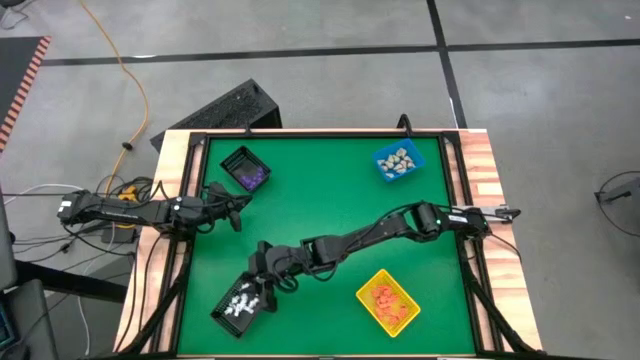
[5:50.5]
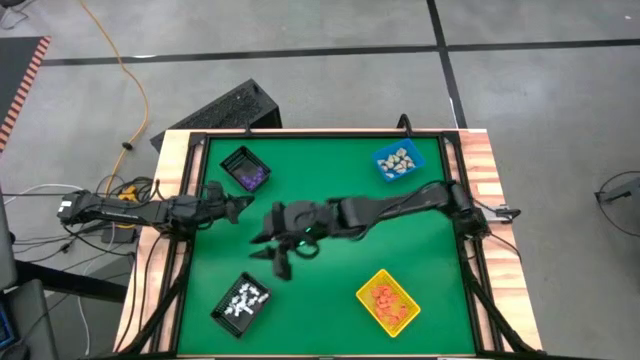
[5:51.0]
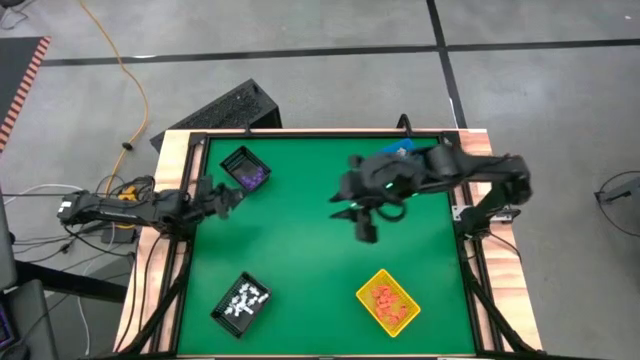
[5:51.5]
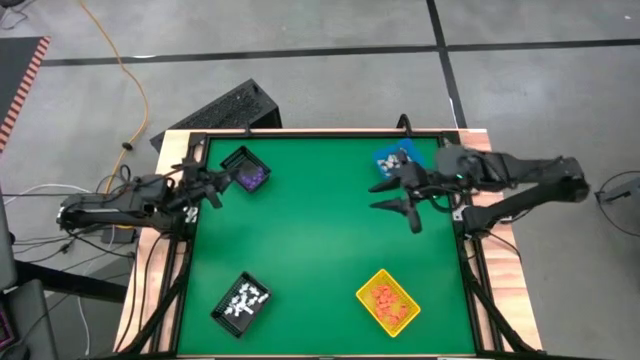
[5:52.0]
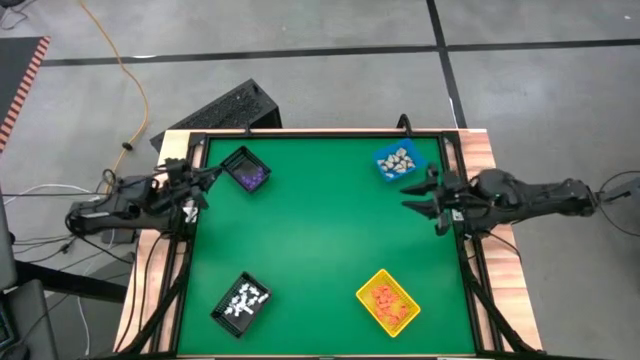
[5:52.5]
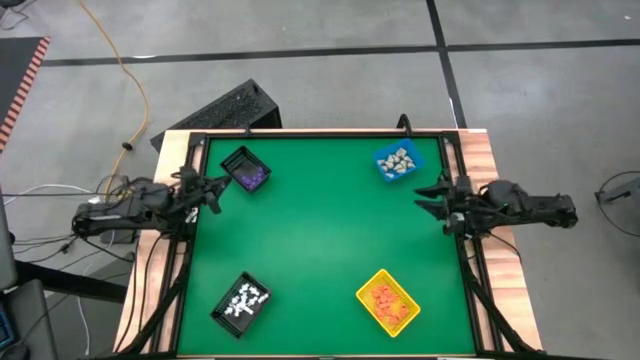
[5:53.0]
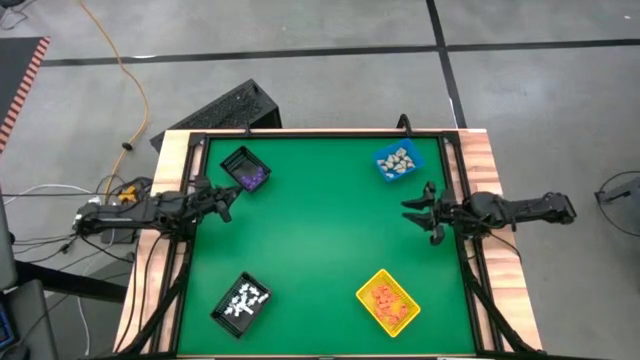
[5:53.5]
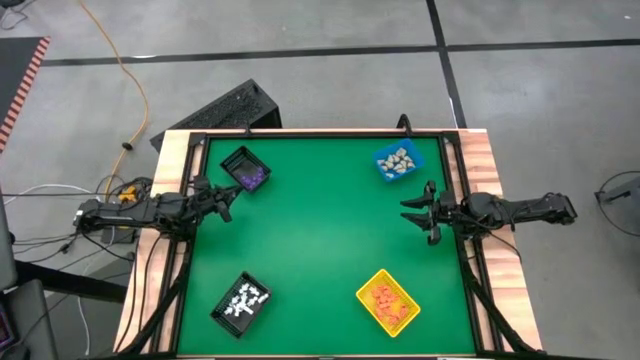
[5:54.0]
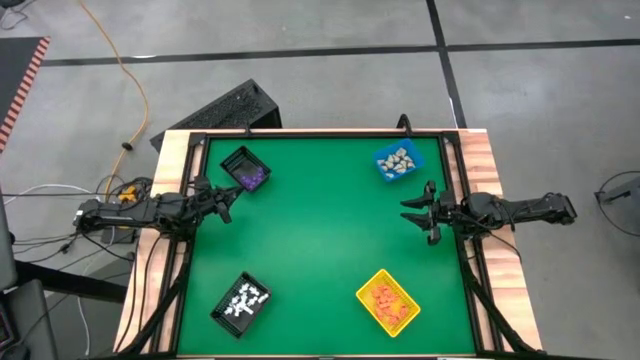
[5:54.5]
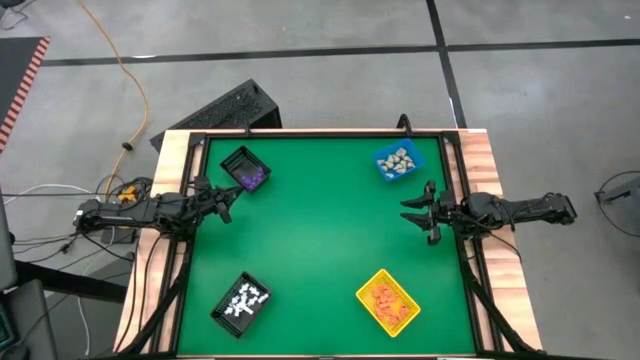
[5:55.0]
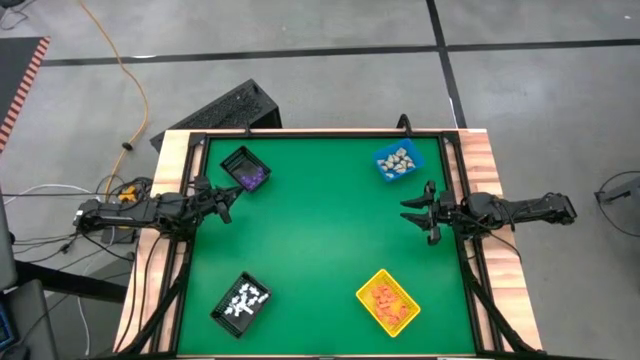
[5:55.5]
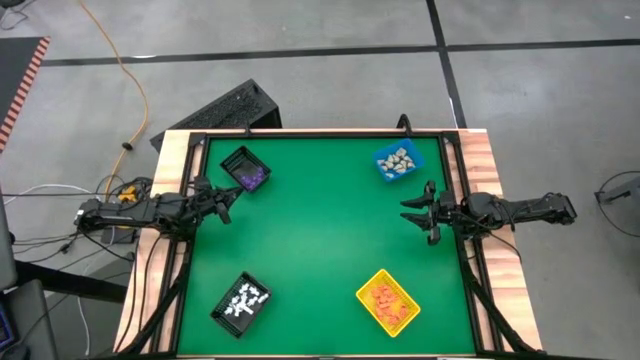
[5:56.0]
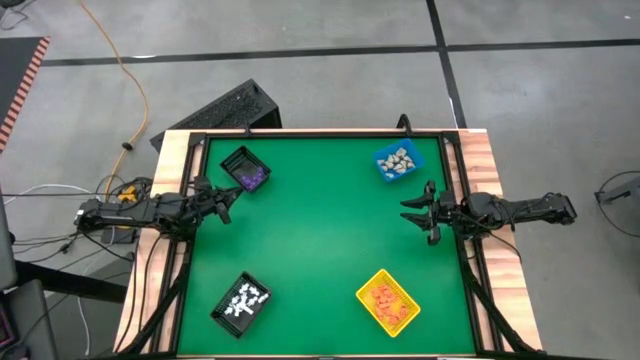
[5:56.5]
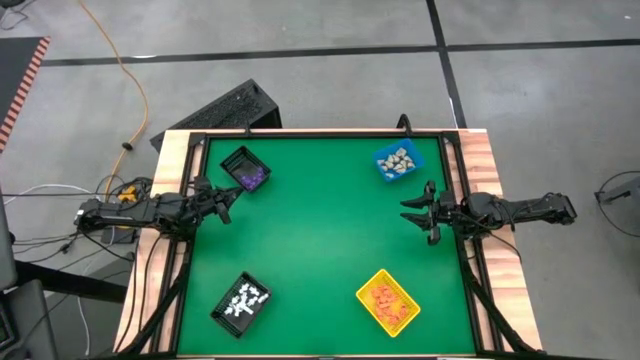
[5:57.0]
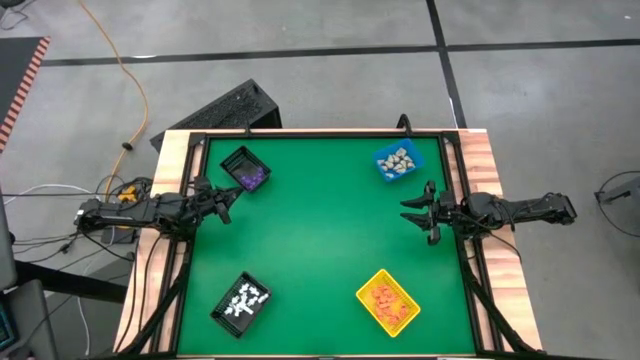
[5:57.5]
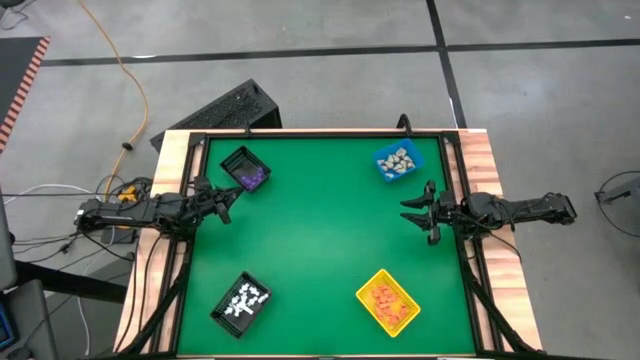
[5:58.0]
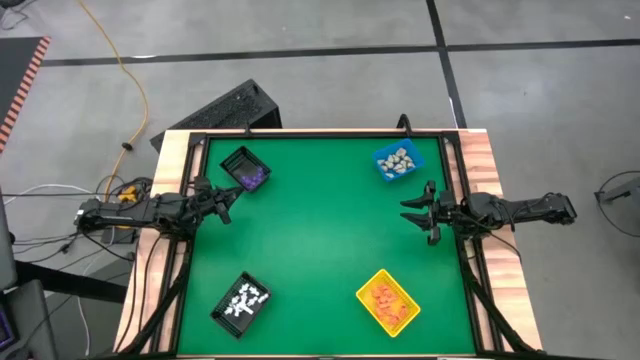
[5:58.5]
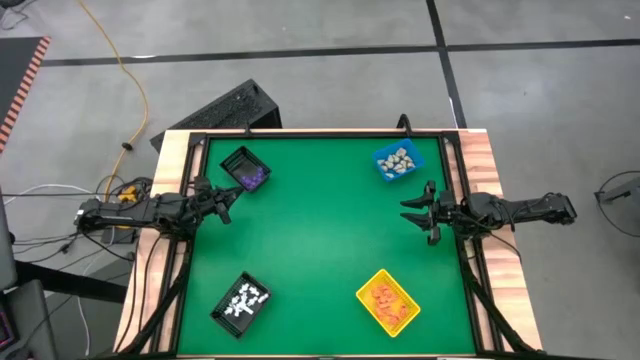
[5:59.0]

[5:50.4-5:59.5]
Task: Sort Halloween decoration
Return to Home Position

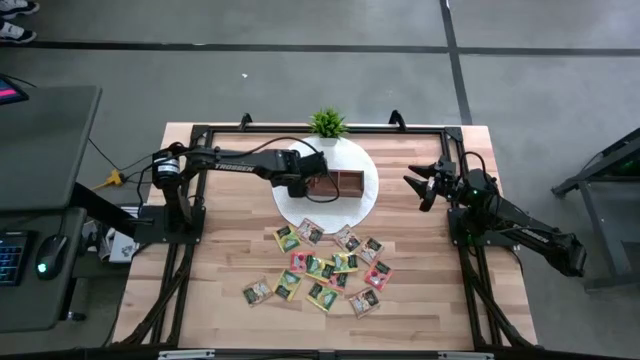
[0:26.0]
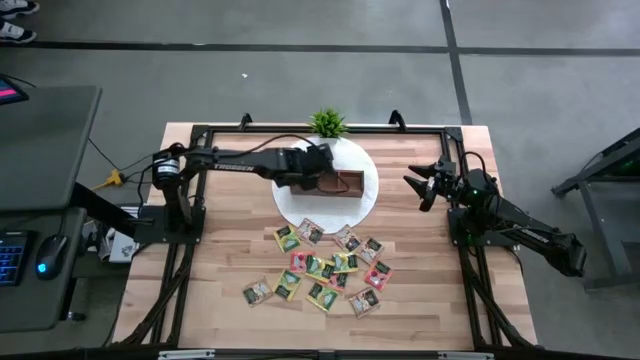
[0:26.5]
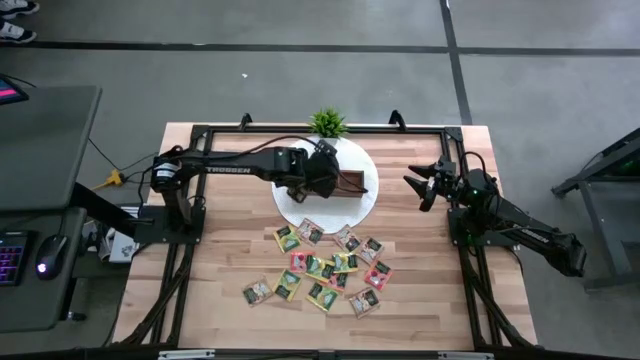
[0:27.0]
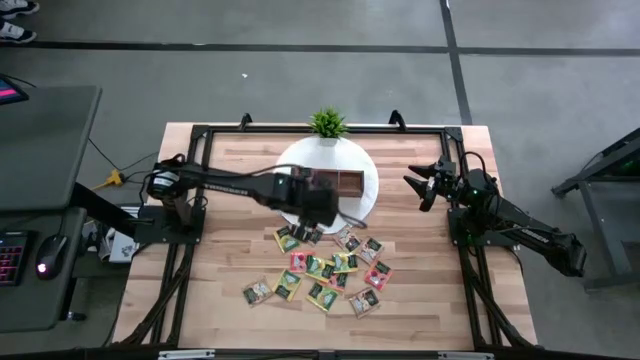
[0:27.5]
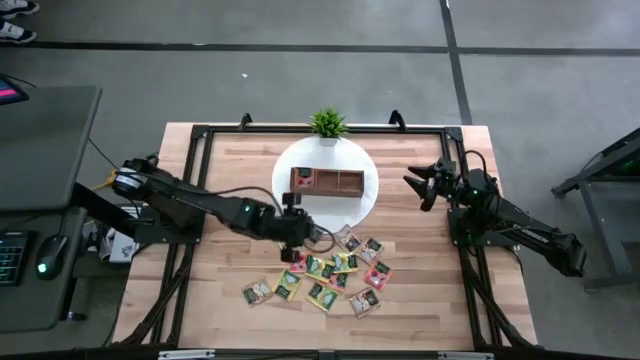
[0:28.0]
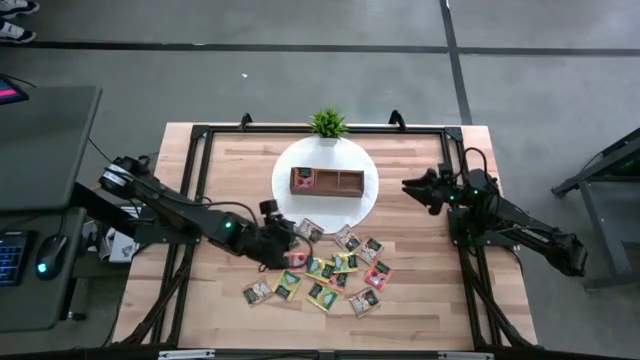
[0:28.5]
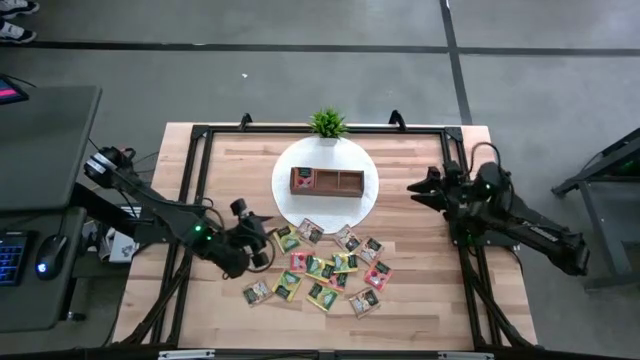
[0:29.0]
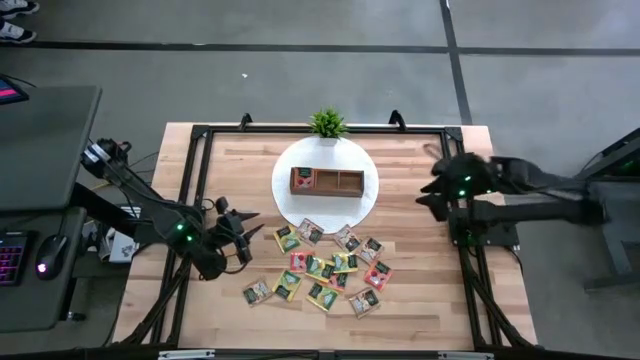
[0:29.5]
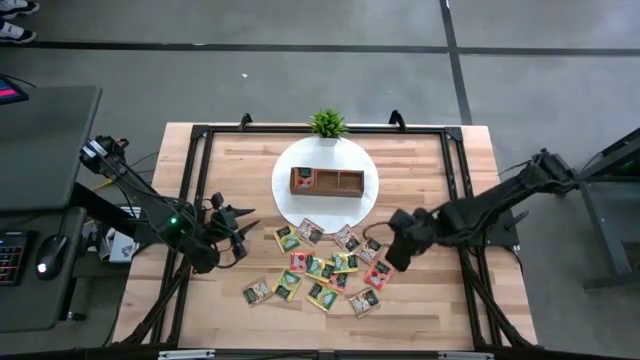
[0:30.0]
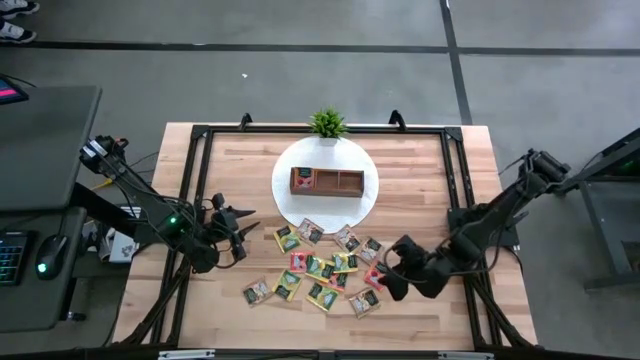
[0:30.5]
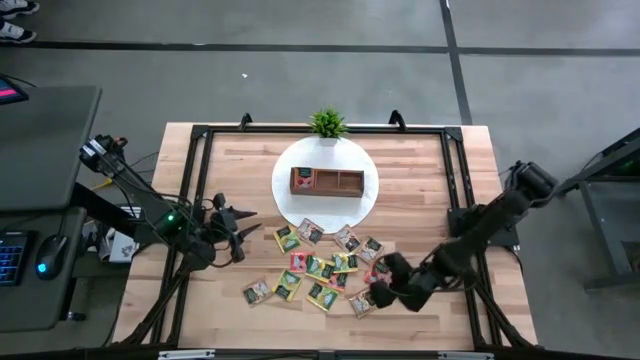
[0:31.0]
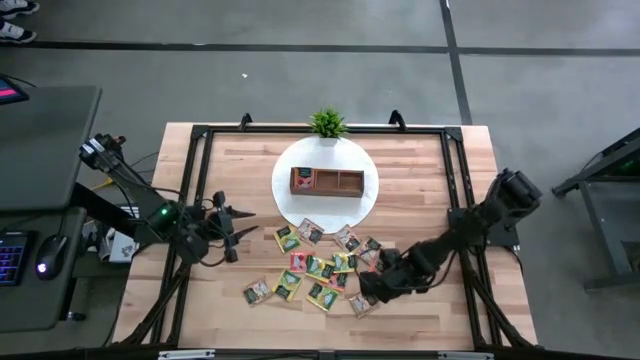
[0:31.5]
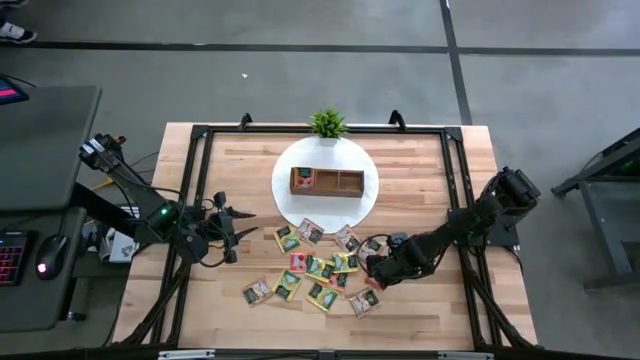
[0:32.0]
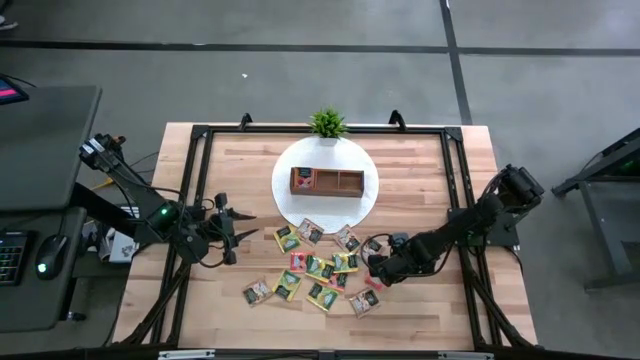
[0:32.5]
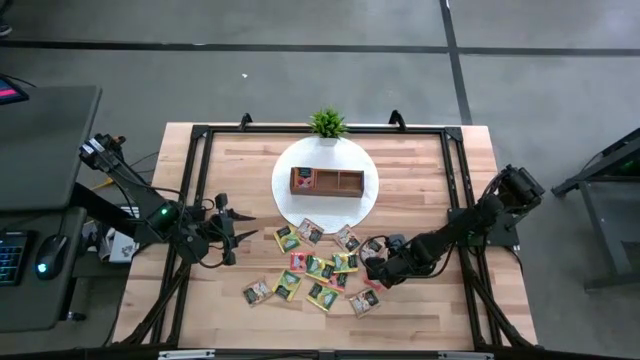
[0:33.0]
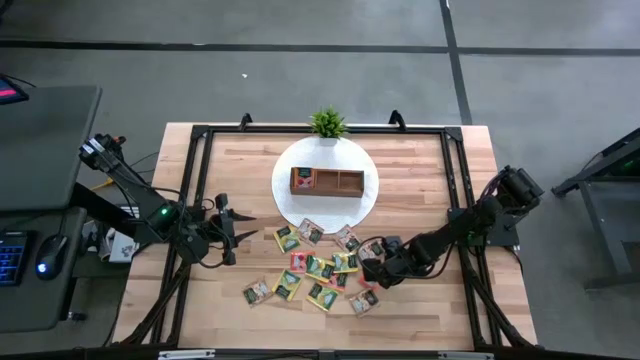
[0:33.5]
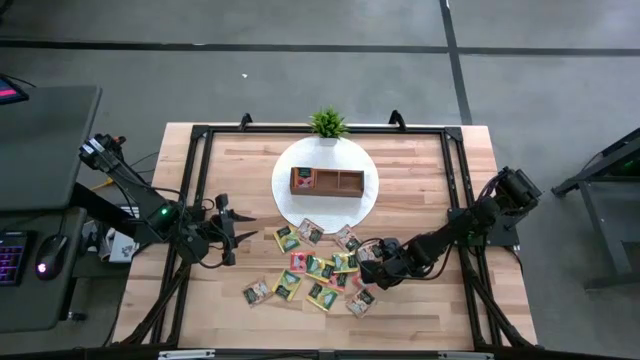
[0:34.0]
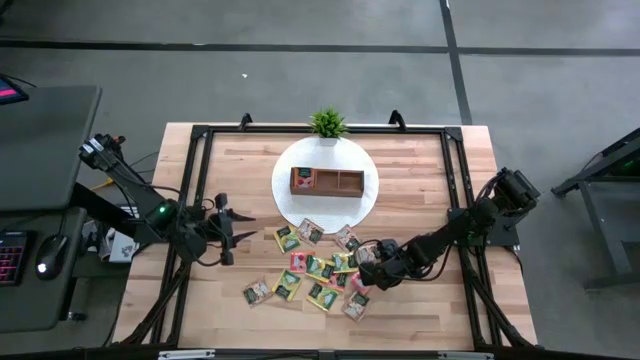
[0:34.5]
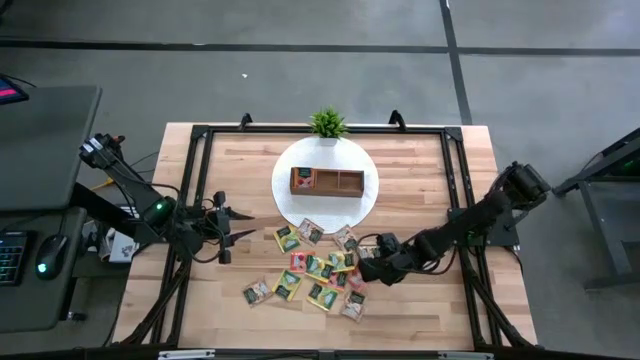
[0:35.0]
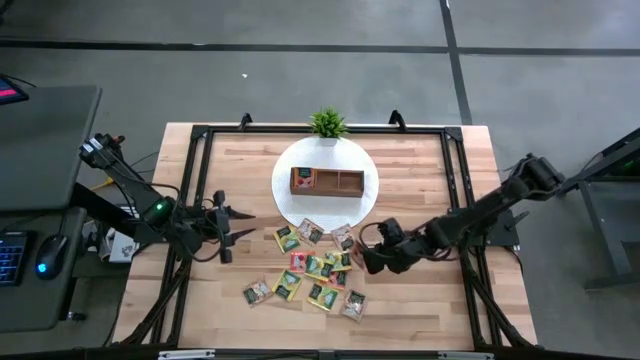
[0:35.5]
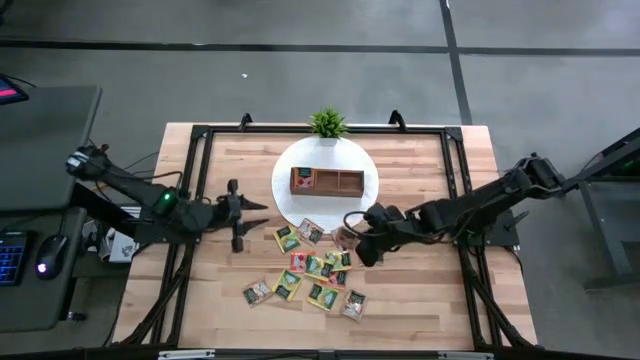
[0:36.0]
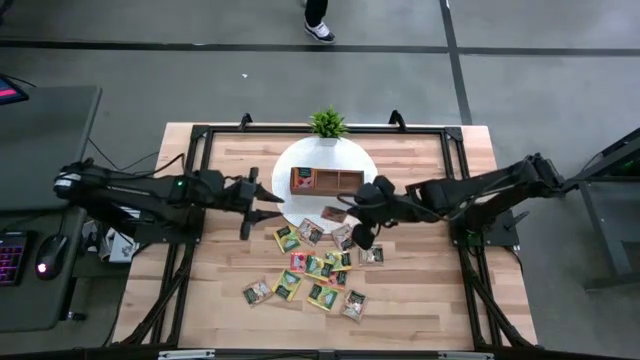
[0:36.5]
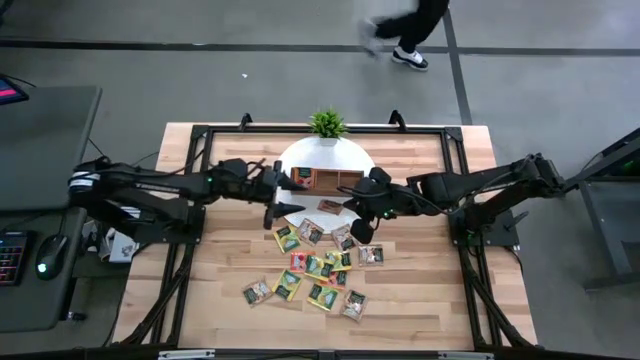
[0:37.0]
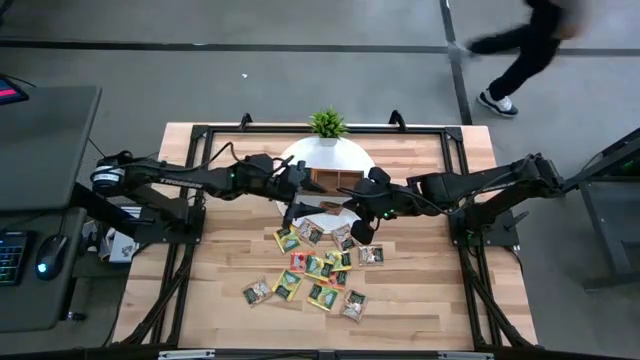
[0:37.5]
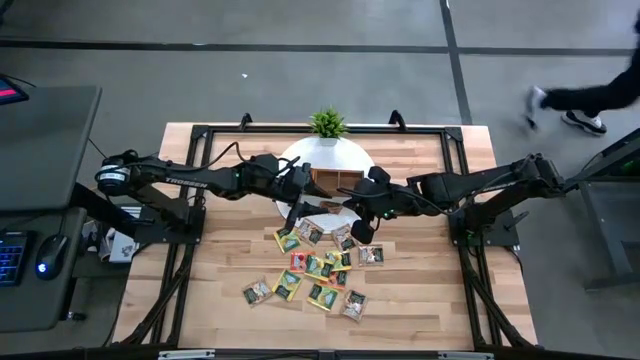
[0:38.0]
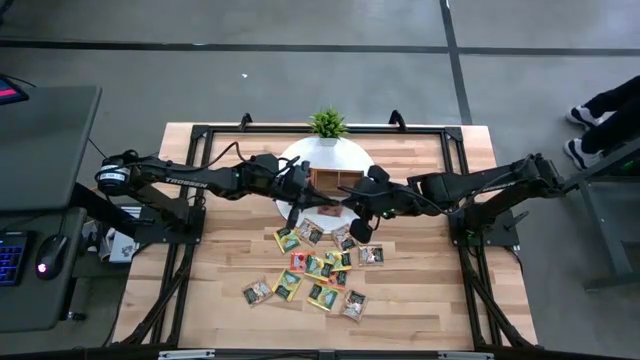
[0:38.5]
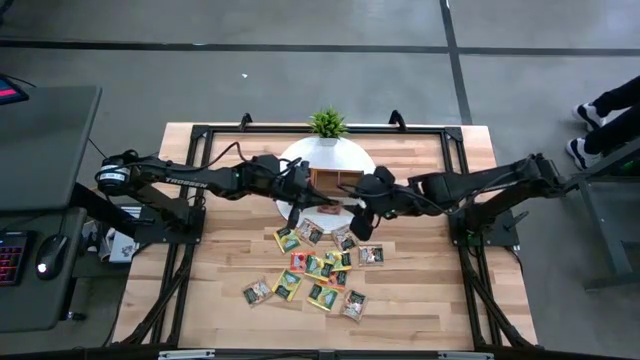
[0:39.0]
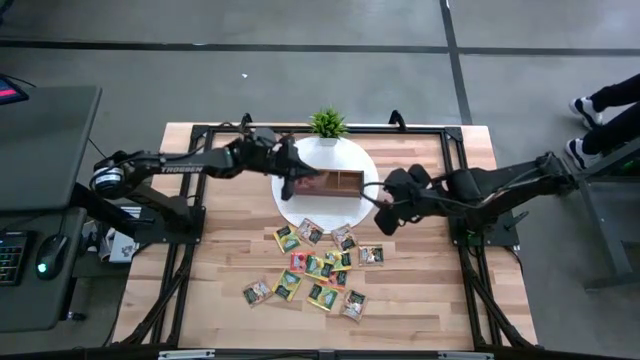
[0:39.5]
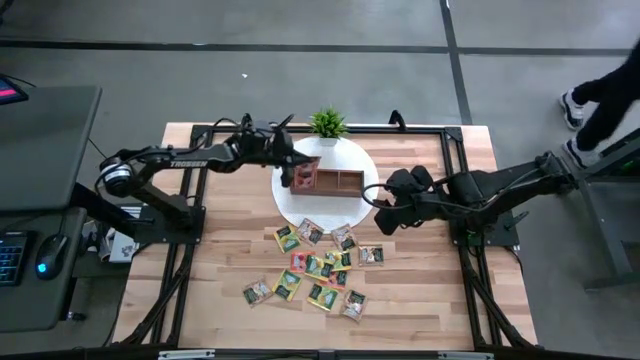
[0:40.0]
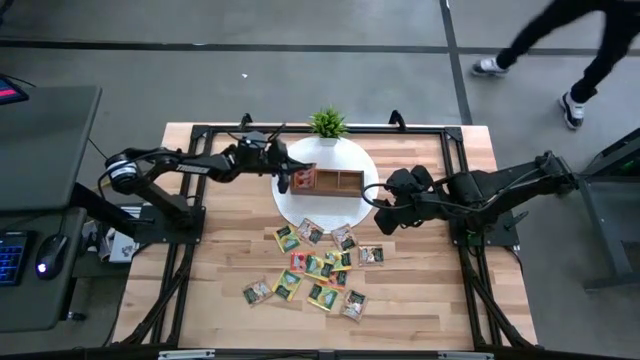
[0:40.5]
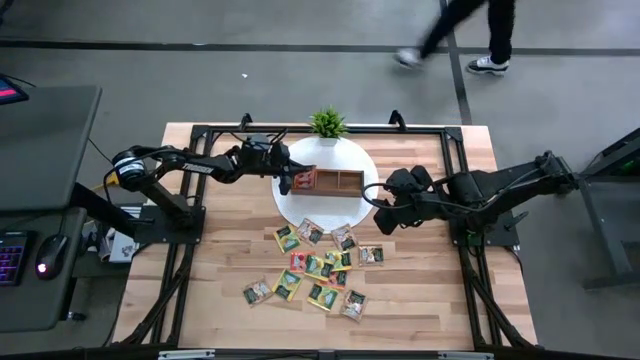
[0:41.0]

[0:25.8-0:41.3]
Task: Pick & Place Tea
Put the orange tea bag into the left section of the wooden organizer
